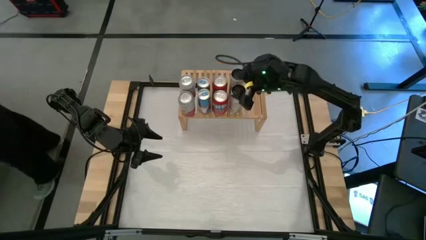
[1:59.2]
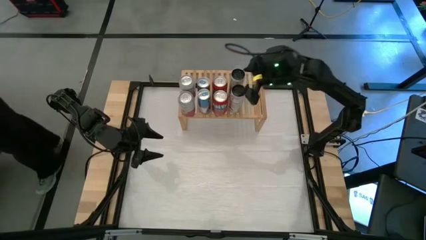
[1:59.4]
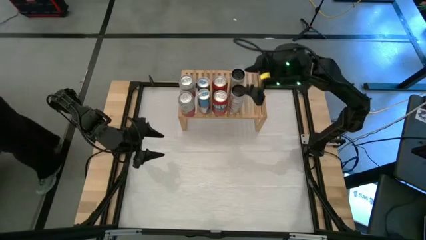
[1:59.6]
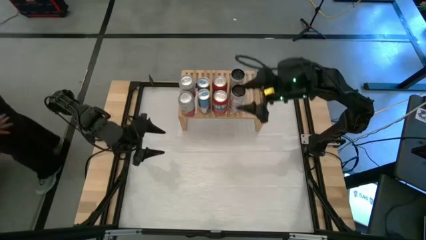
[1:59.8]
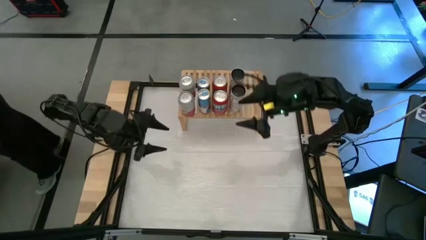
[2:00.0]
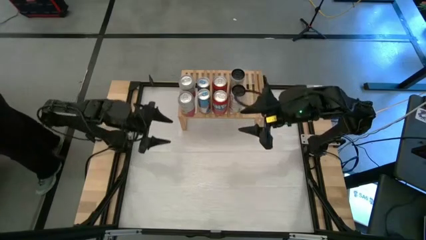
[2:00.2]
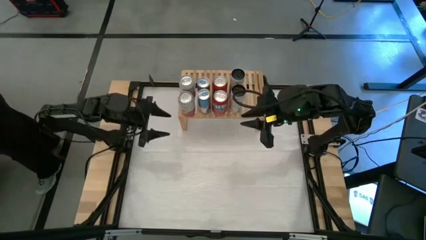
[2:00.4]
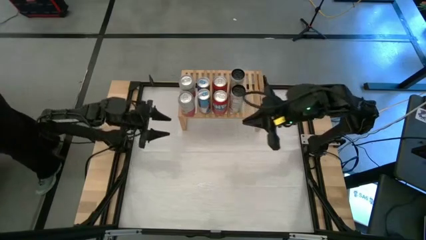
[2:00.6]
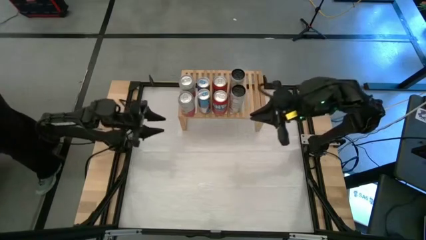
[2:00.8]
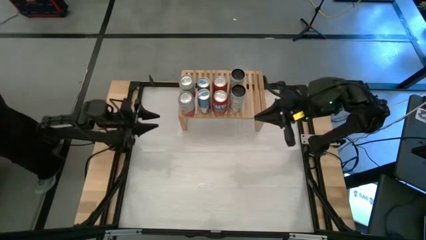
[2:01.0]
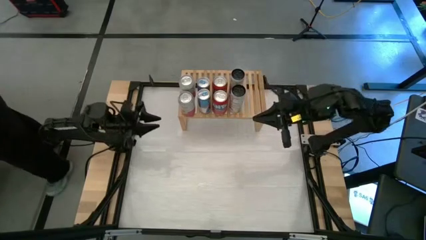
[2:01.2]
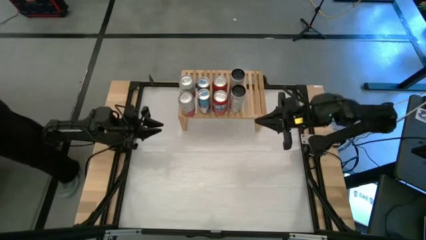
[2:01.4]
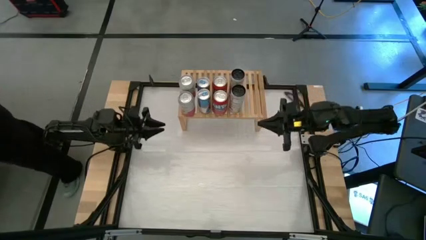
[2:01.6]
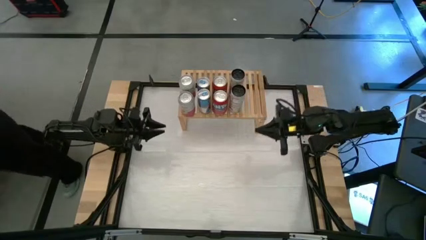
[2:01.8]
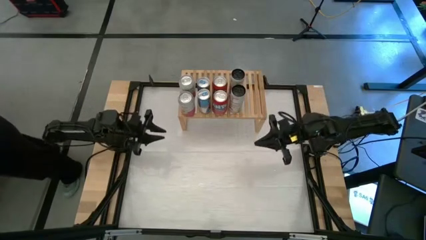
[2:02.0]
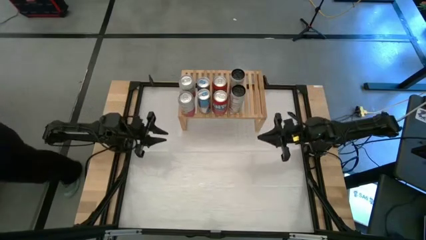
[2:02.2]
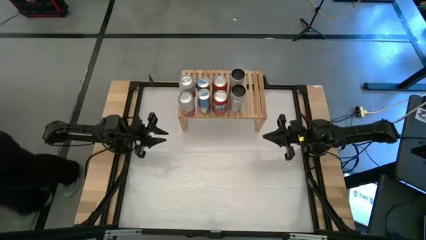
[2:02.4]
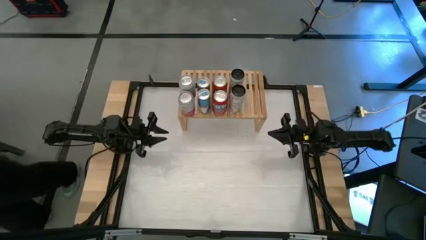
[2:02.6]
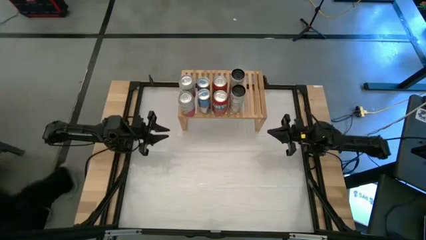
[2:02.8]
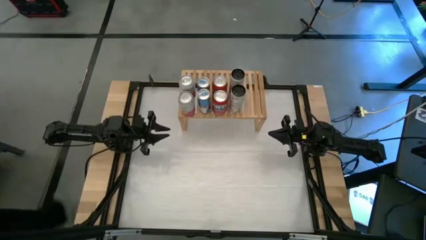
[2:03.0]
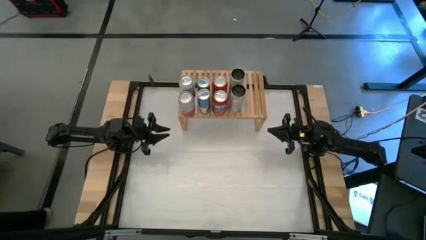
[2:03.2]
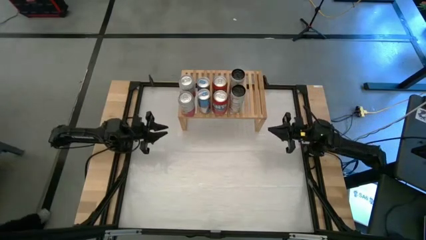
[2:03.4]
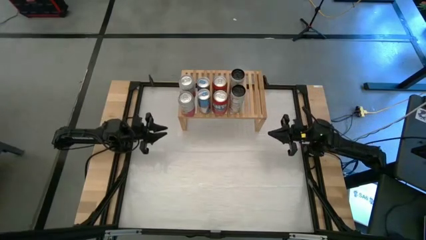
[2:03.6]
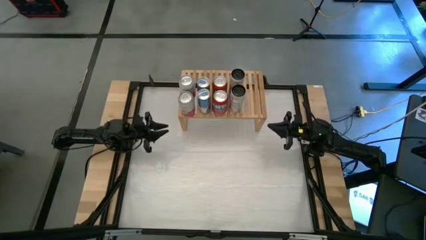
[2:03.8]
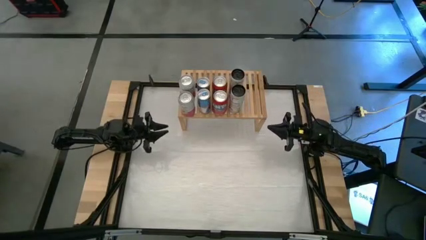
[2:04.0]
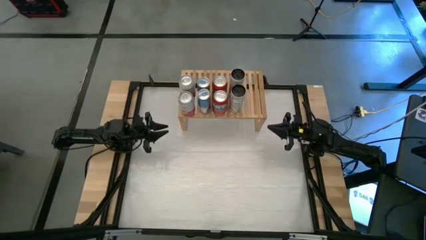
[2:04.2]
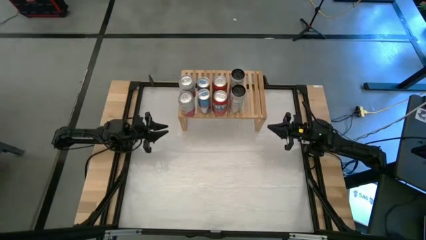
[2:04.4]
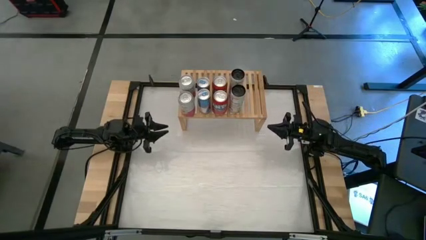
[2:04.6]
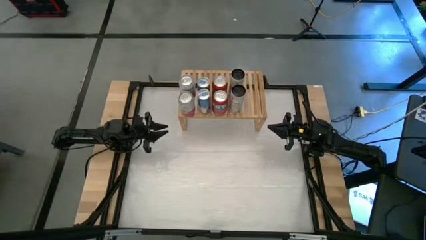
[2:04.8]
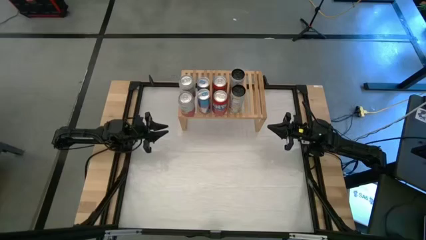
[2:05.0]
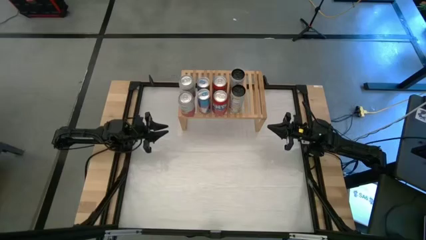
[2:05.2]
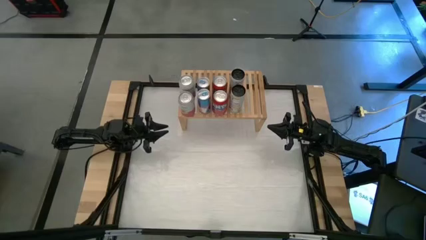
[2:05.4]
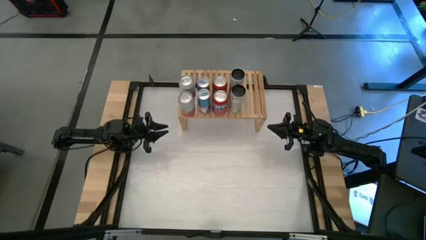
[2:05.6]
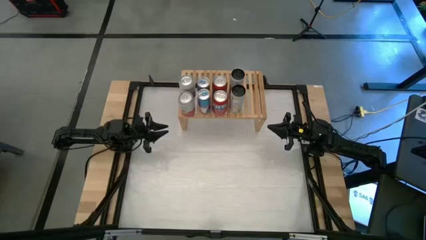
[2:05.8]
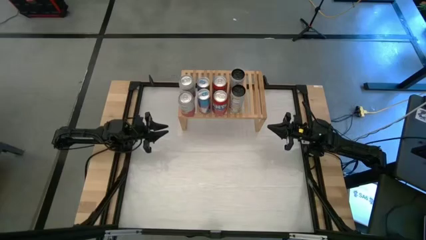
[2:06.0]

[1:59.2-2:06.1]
Task: Place canned beverage on shelf
Return to Home Position

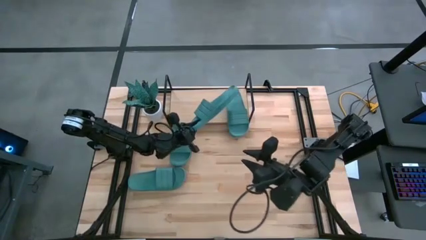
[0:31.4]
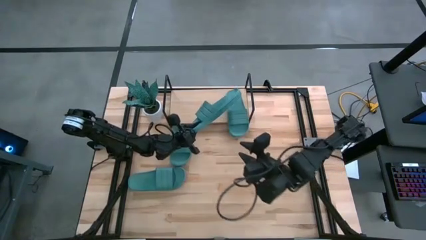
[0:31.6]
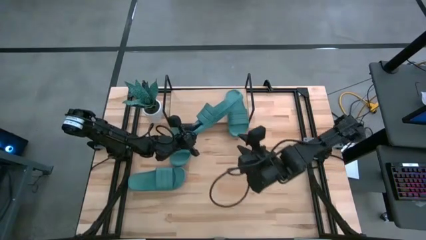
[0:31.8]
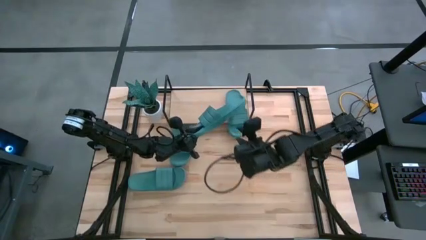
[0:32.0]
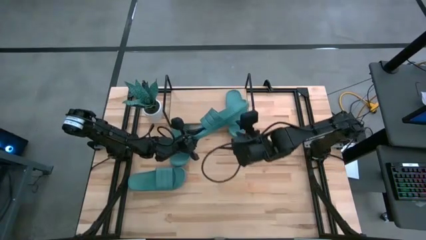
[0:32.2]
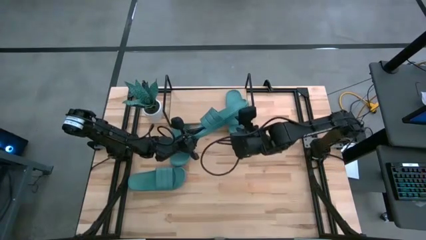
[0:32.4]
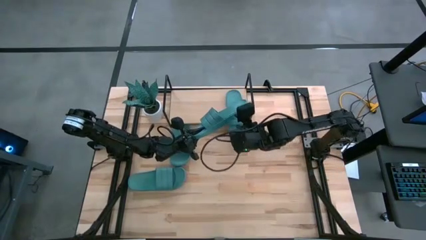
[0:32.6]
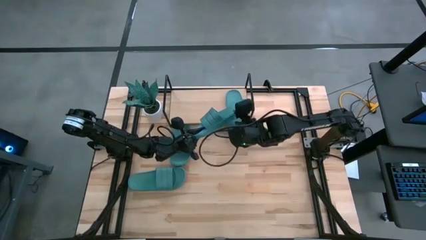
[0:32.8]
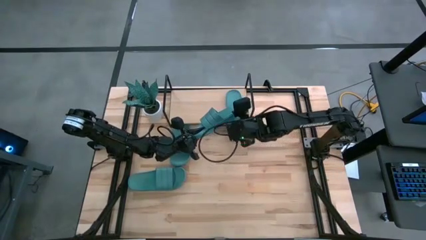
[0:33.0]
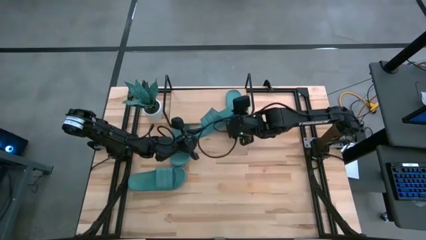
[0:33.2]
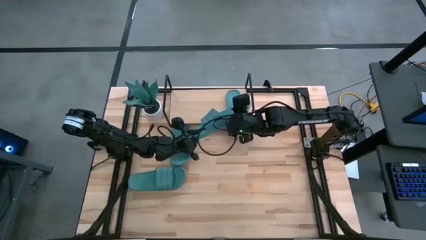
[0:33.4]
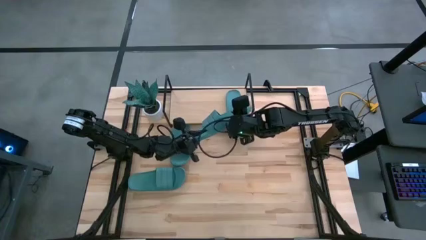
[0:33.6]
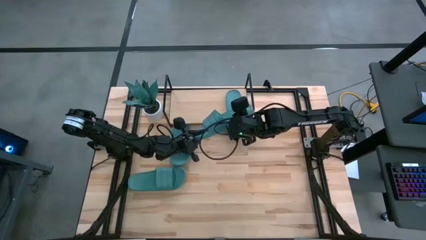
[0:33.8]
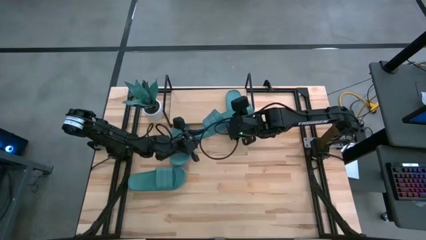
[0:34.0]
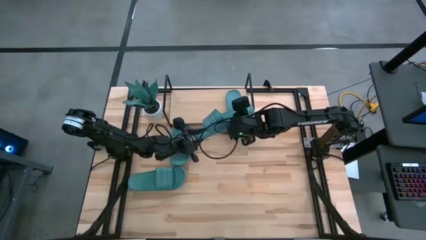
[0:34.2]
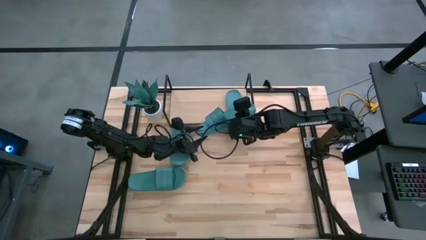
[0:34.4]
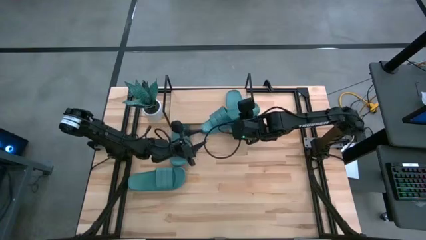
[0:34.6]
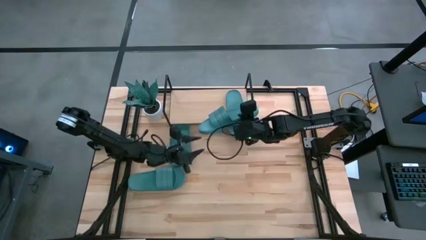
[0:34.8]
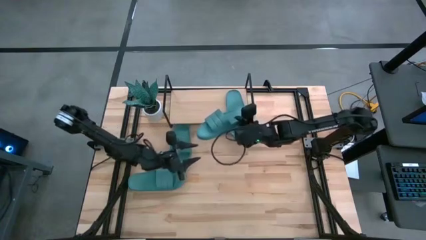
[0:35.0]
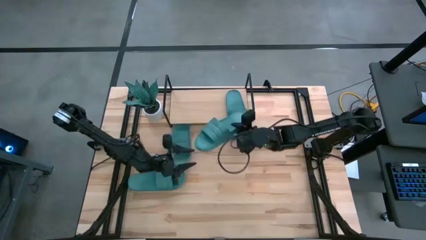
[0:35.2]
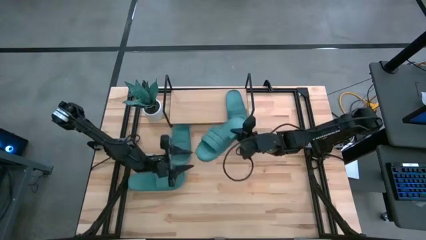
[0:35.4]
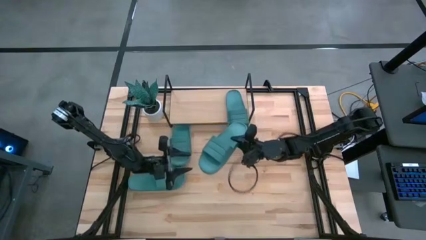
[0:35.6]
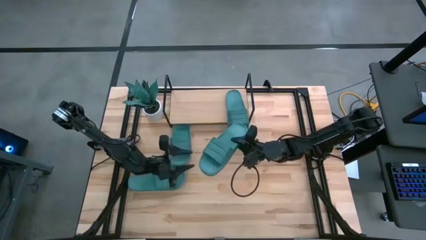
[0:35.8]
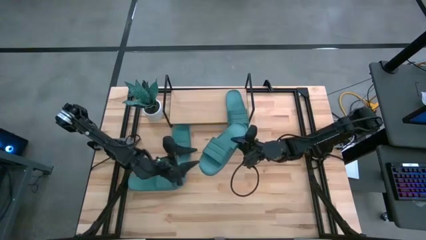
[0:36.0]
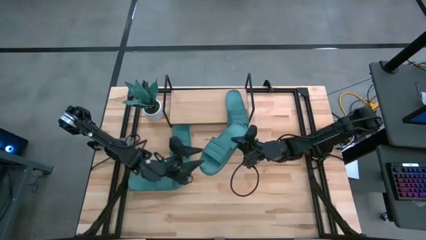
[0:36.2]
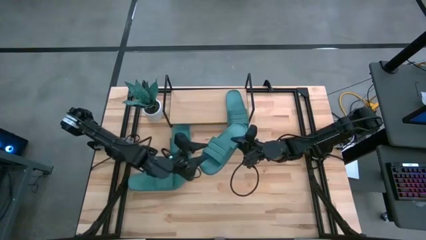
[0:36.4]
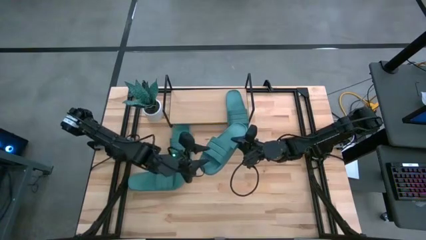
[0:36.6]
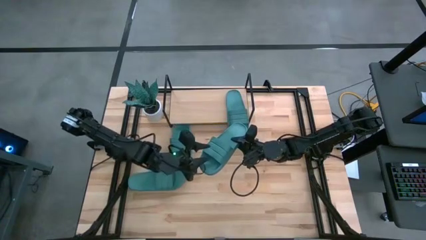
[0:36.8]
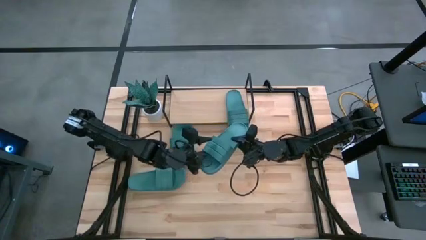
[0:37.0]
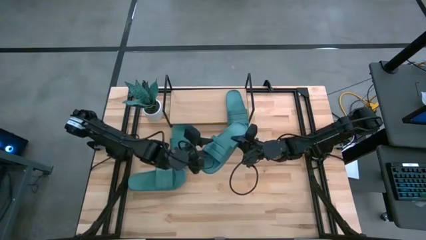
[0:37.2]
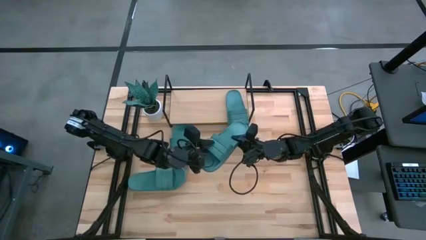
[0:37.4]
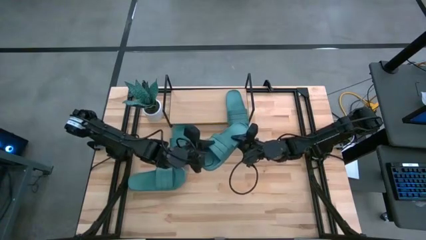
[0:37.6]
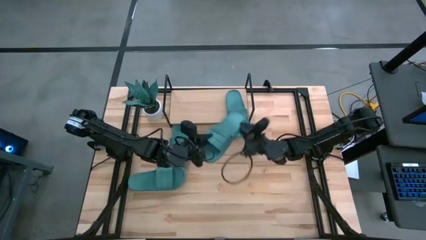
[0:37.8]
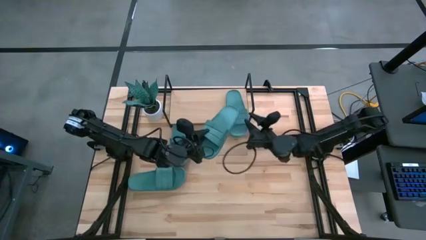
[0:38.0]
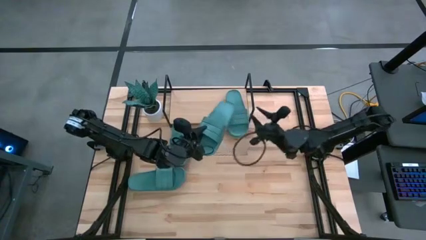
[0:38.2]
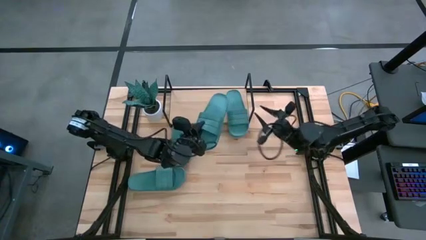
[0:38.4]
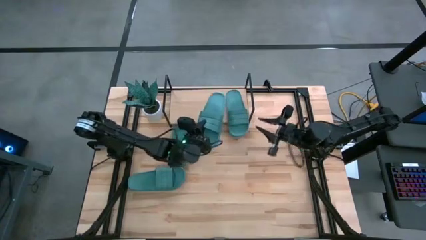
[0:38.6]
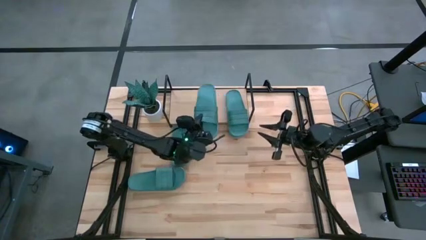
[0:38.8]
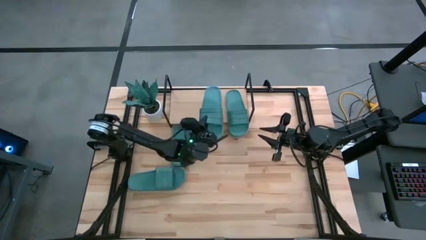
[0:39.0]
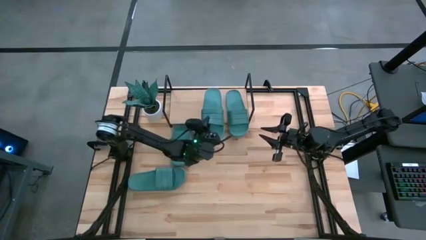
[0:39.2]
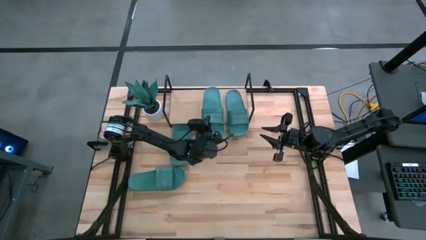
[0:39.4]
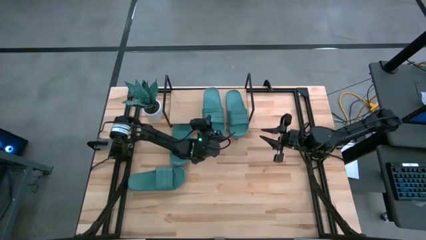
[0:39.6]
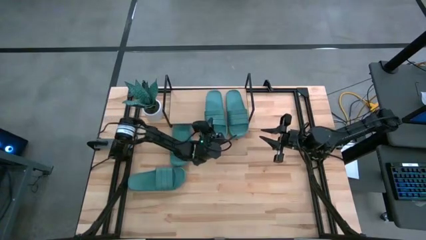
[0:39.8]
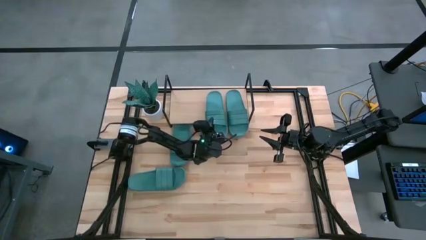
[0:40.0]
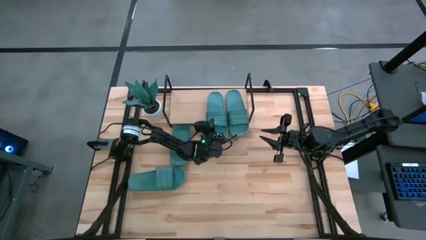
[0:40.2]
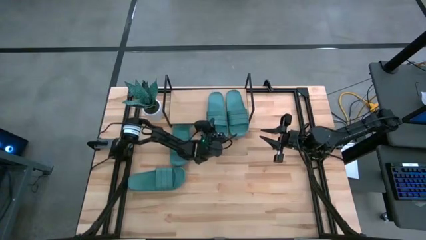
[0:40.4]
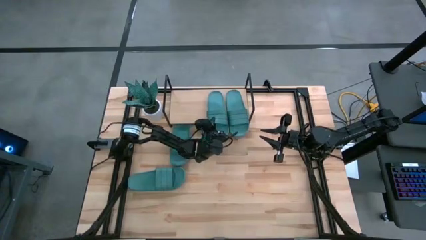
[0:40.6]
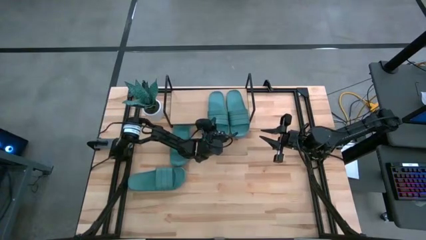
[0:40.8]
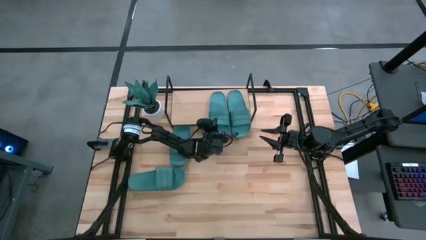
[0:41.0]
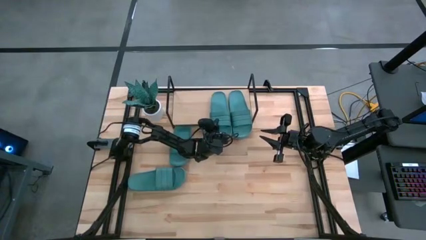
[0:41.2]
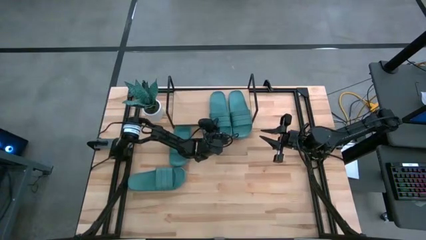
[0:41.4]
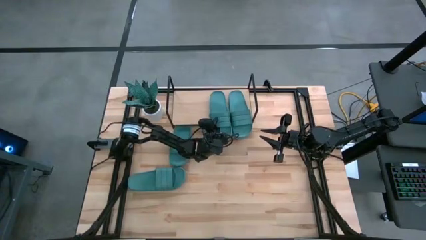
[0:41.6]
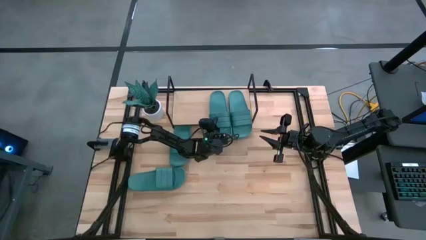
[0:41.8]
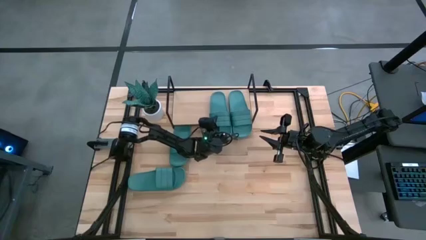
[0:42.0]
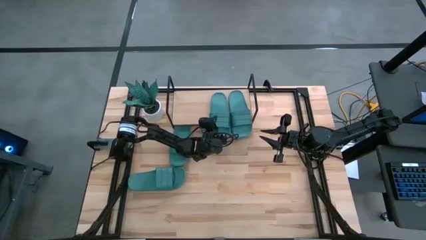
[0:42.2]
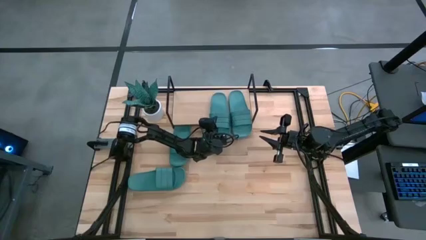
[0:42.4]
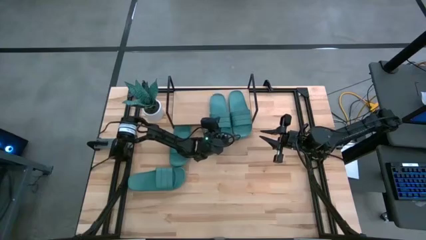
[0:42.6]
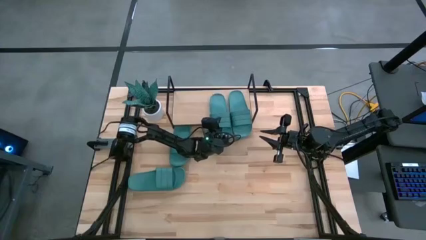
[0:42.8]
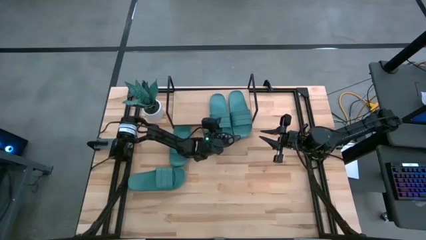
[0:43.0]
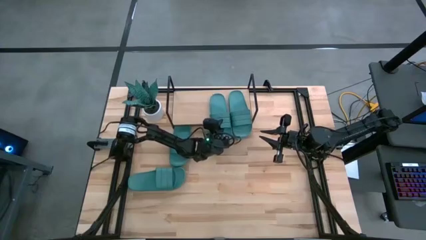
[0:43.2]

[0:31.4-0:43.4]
Task: Pick and place slides into the shelf
Put the green slipper on the shelf
